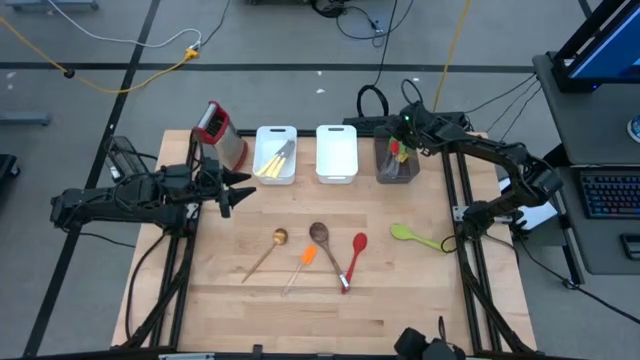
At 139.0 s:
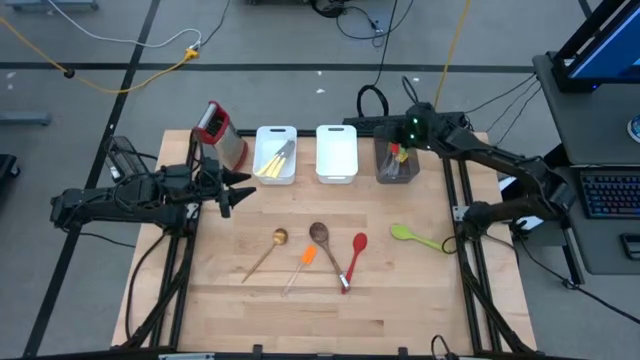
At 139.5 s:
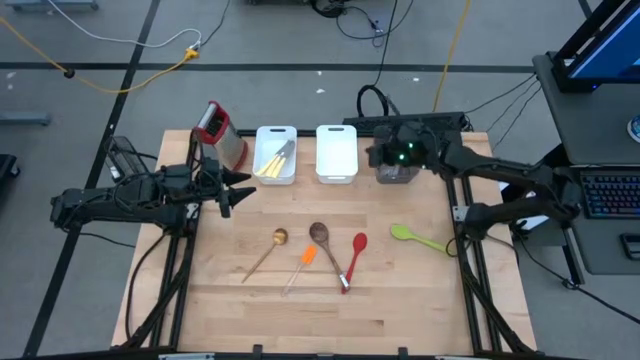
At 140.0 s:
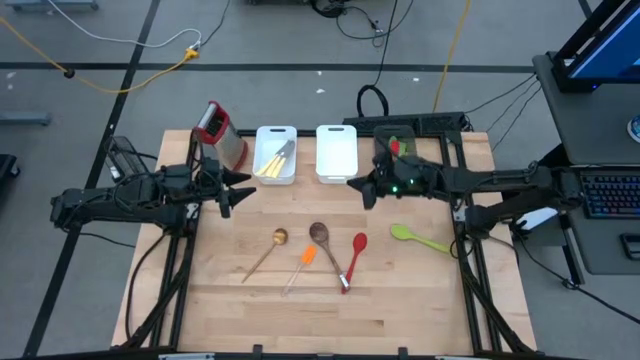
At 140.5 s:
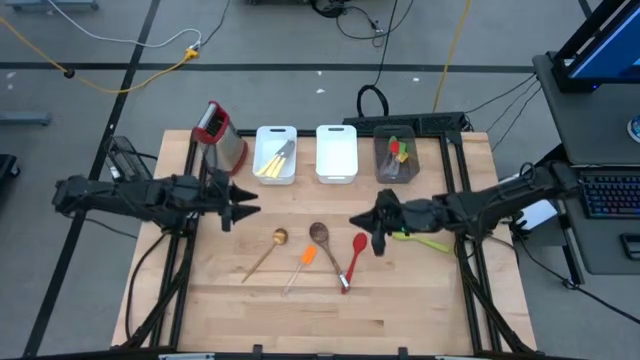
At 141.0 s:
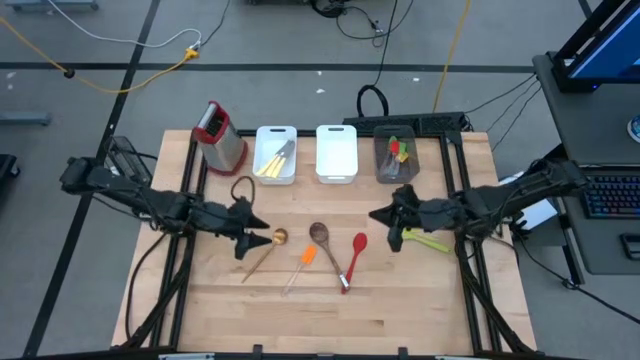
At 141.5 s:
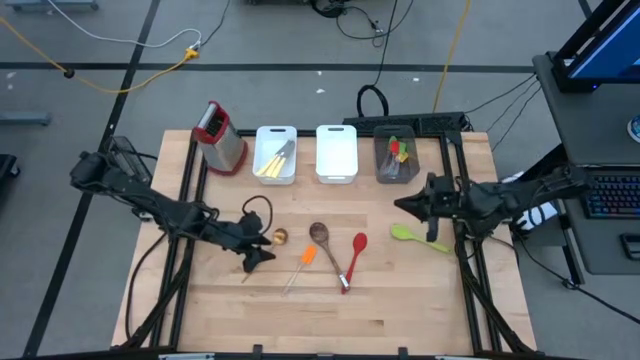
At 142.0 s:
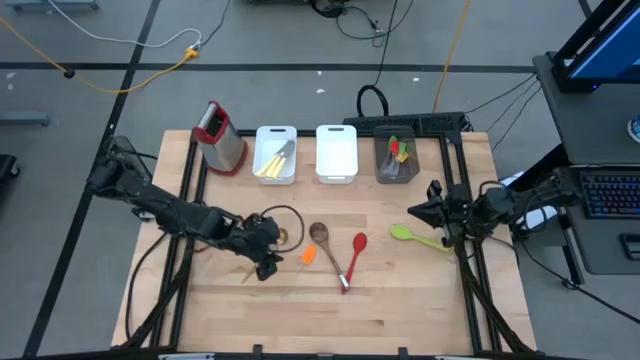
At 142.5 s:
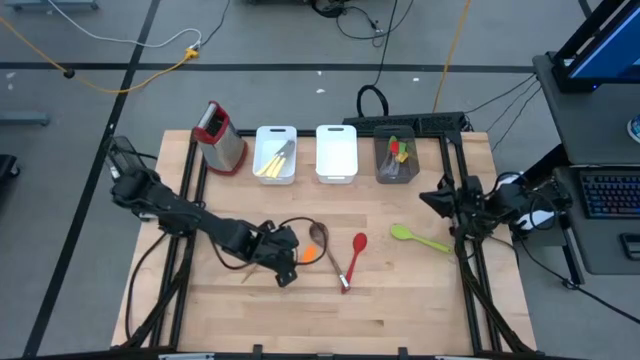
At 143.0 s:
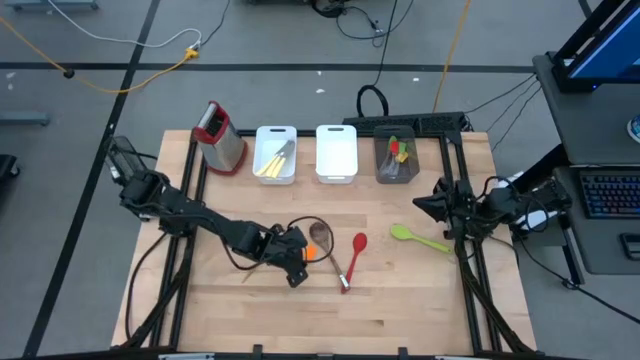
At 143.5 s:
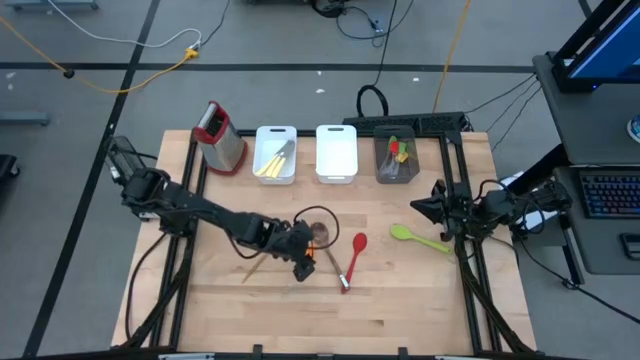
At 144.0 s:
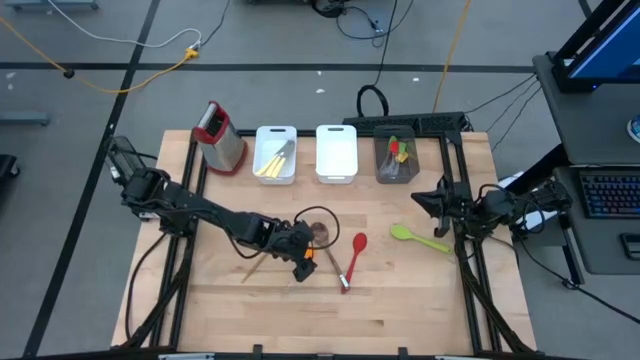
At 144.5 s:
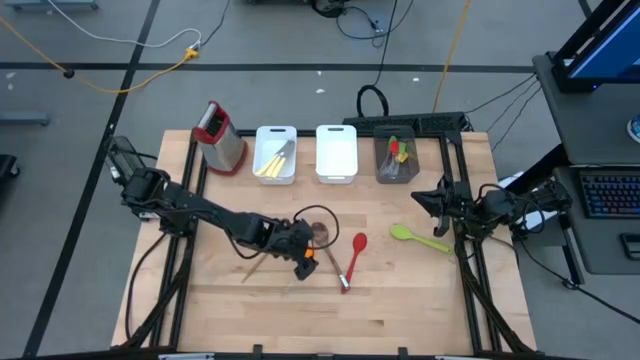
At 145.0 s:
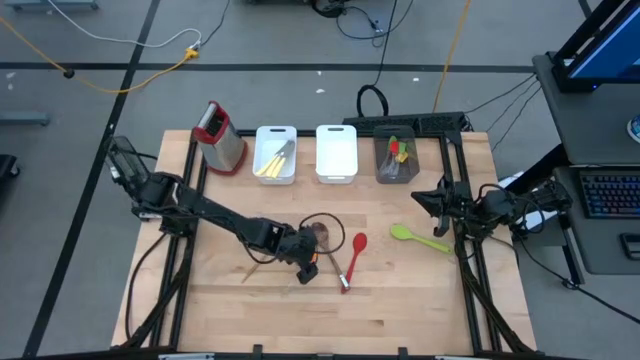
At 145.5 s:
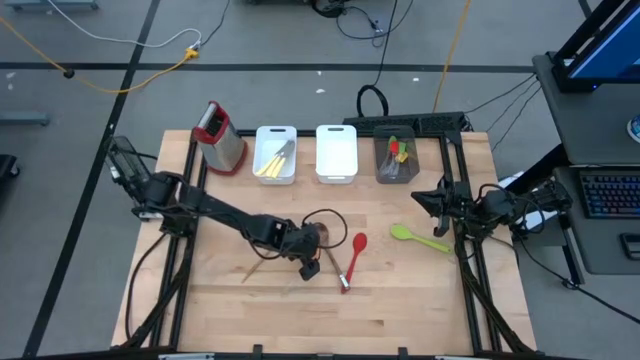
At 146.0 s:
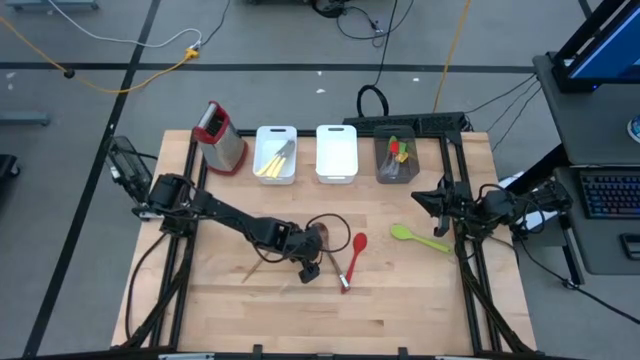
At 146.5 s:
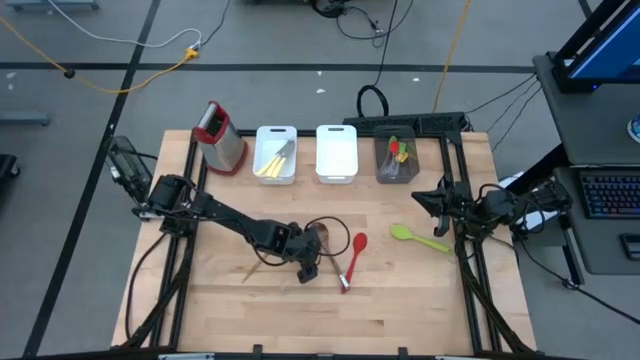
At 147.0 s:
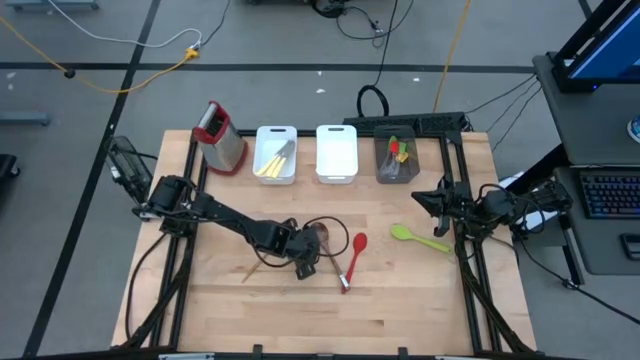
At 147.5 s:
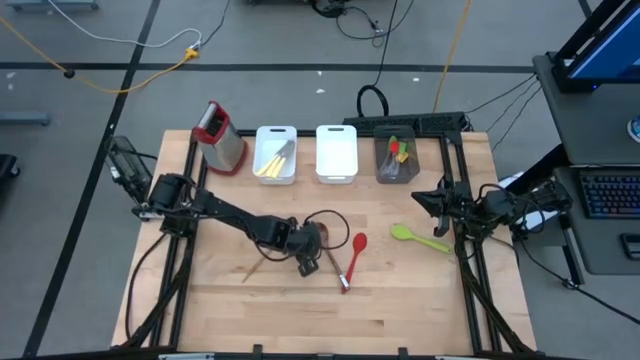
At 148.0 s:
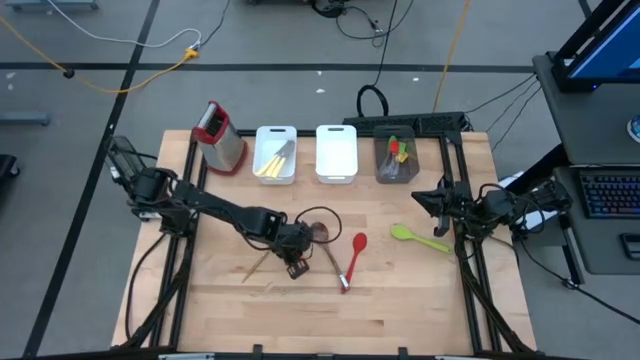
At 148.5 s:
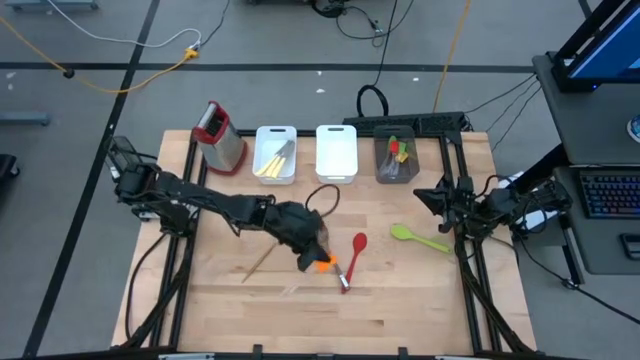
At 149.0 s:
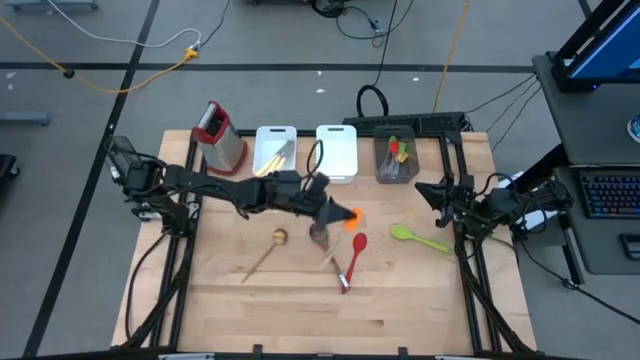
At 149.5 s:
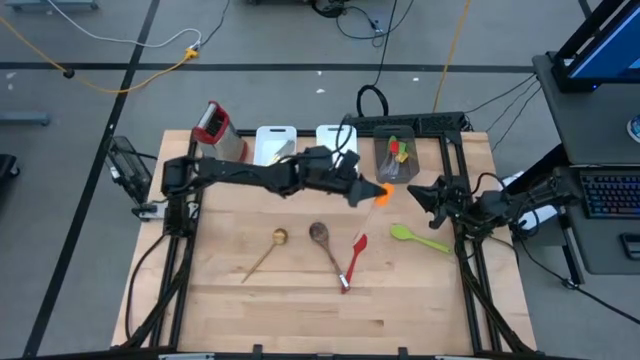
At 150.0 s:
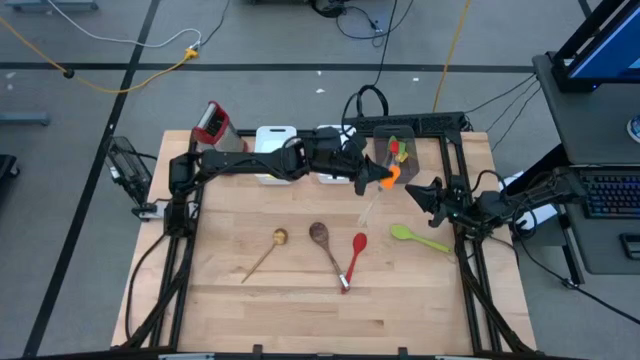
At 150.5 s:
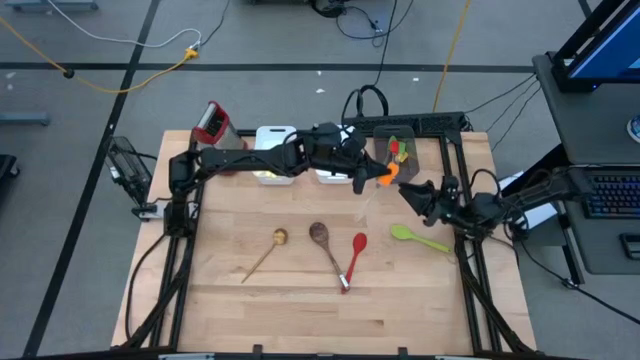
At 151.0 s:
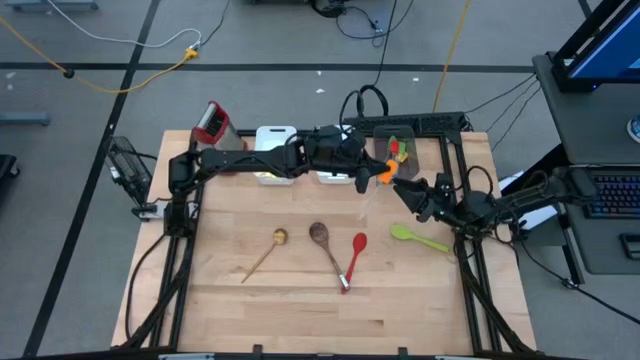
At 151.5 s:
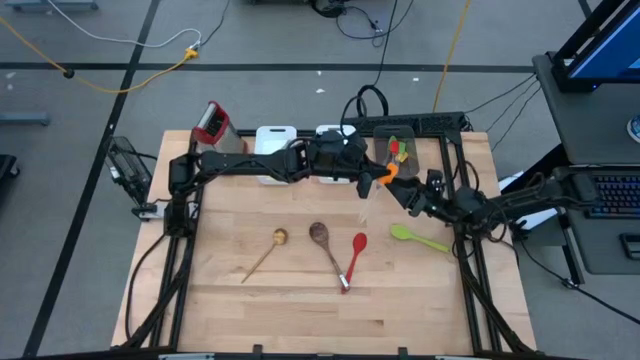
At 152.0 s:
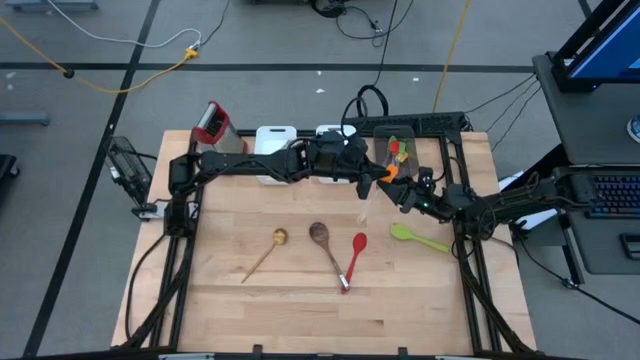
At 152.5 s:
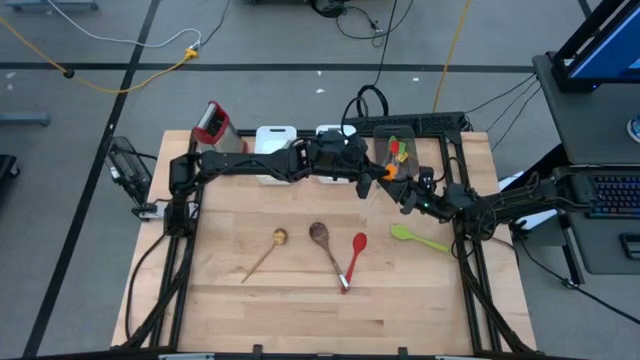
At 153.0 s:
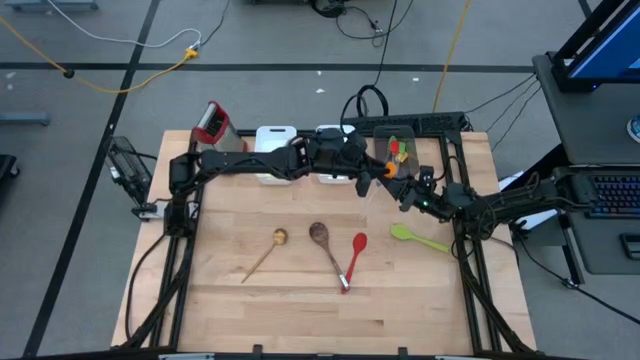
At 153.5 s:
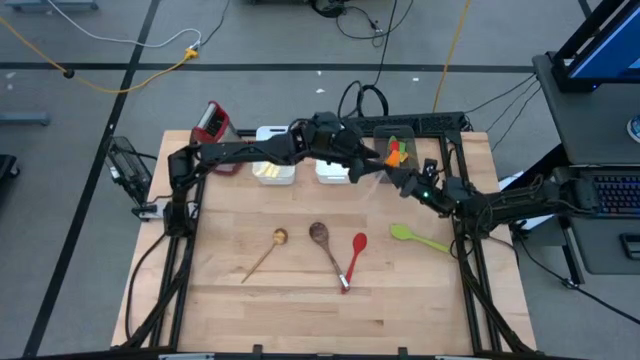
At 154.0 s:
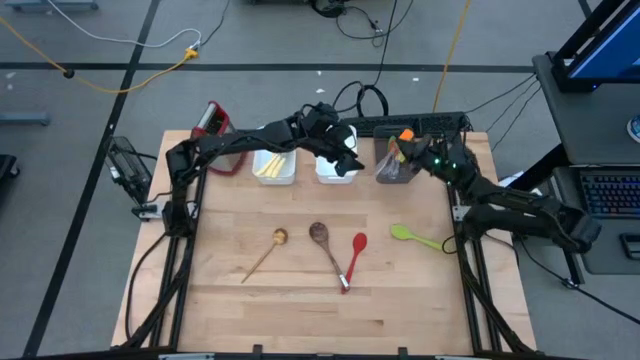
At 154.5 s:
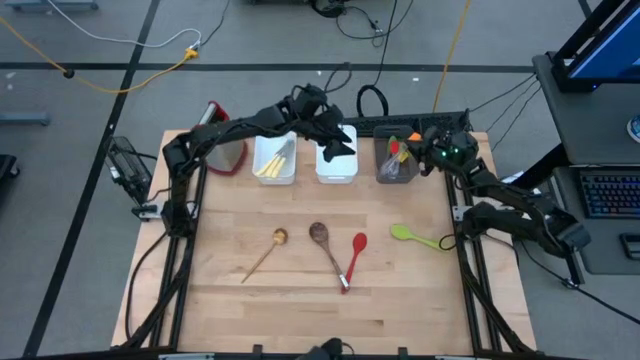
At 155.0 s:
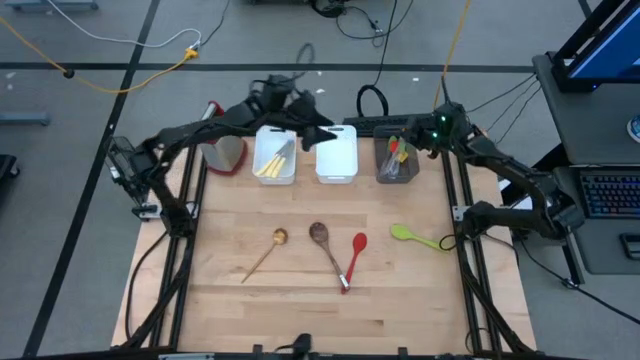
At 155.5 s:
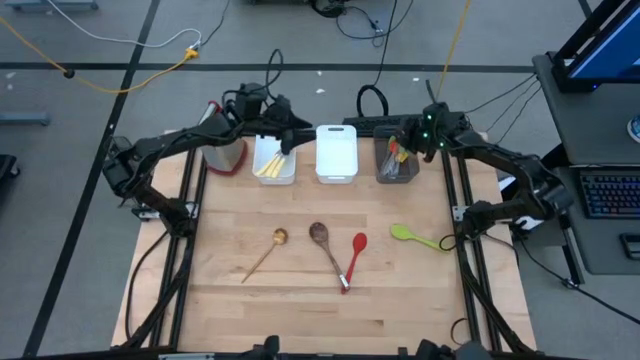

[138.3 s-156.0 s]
Task: Pick & Place Kitchen Items
Put the orange spatula into the black bin

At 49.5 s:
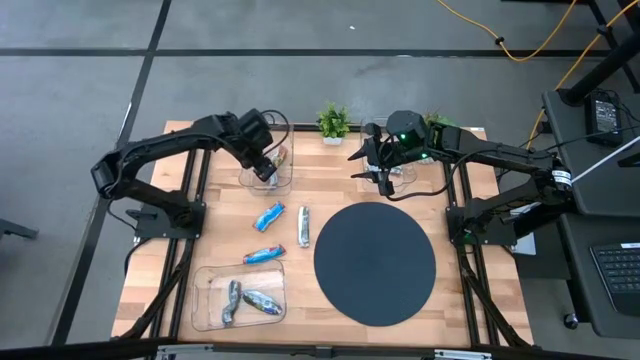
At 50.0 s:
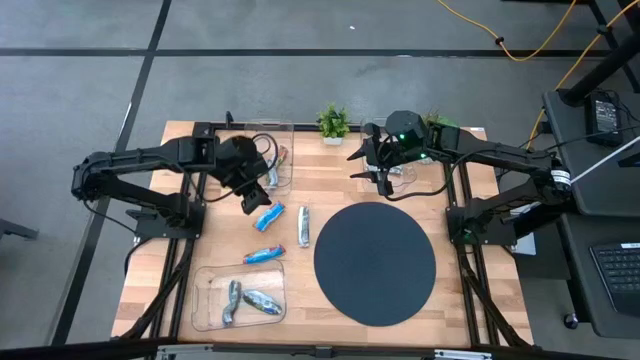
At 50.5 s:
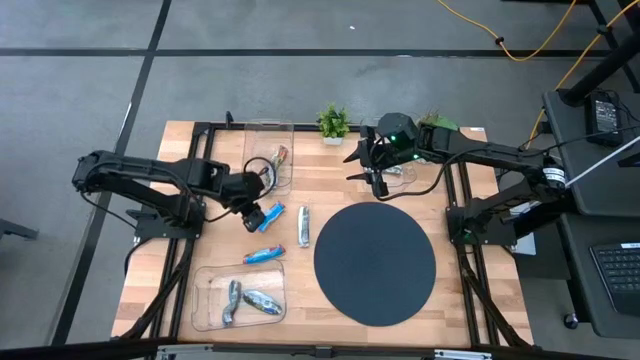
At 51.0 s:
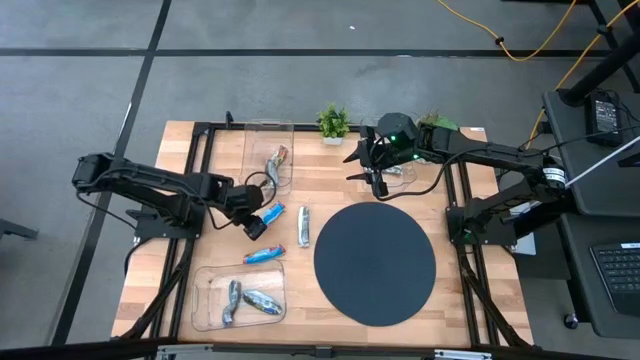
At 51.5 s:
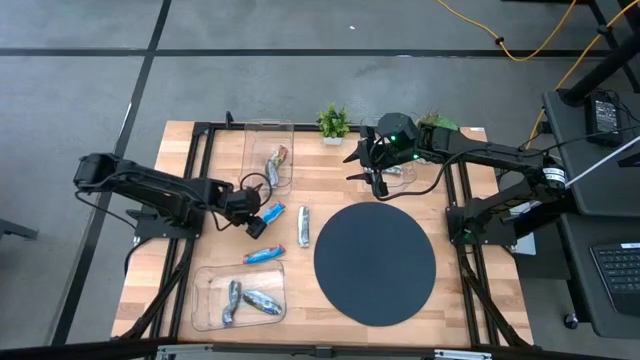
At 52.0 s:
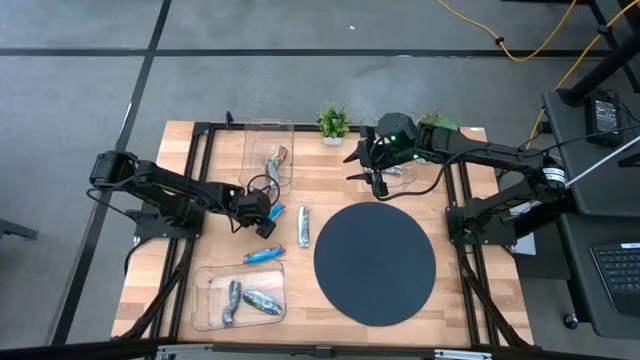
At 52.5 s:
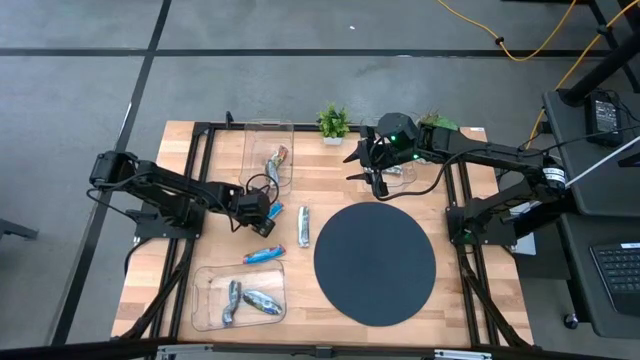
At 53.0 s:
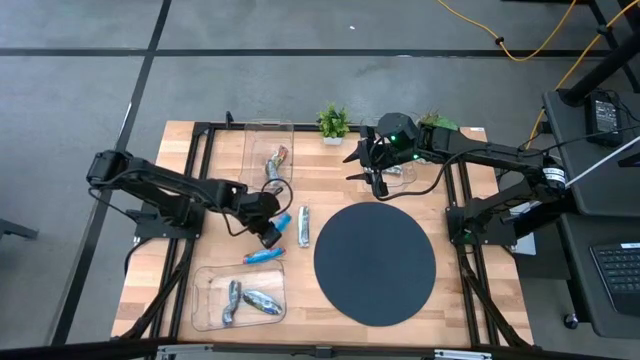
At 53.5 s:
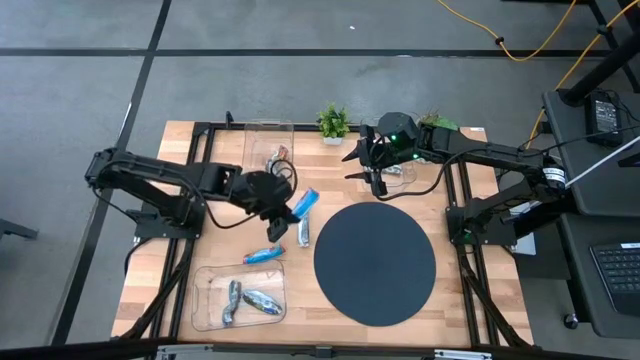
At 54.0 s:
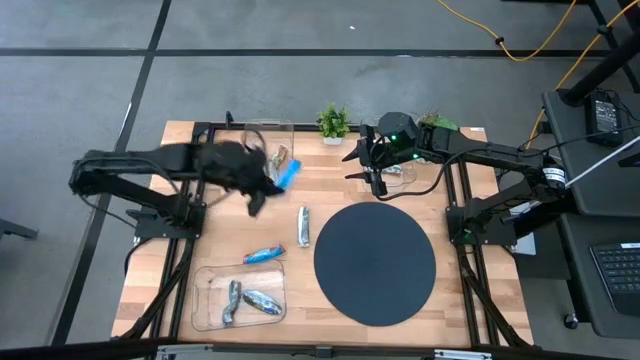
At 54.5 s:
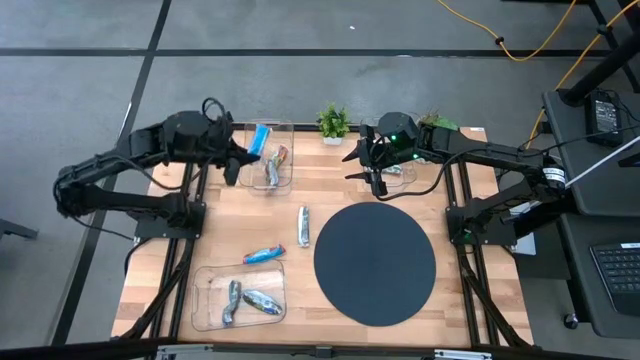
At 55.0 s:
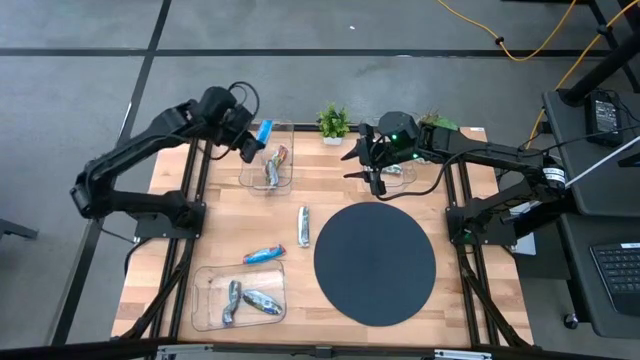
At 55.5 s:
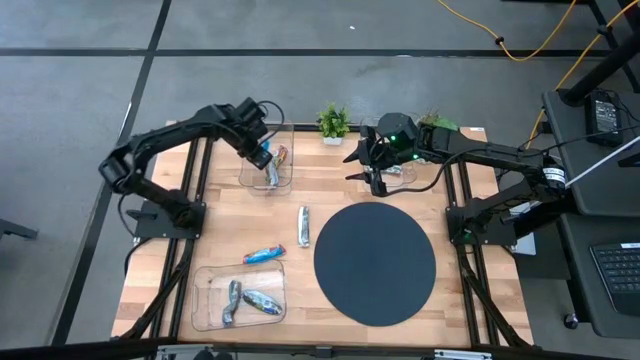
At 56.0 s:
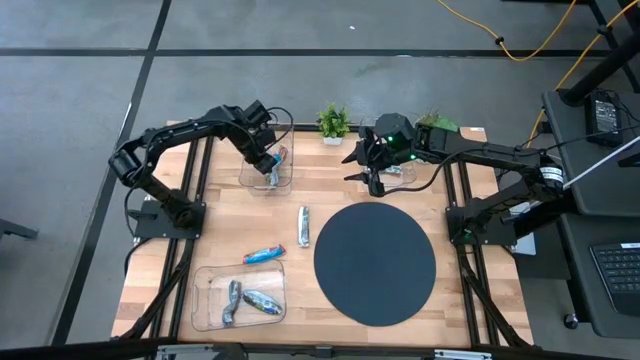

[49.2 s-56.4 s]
Task: Pick and place Granola Bars by type
Put the red granola bar into the top left transparent bin
